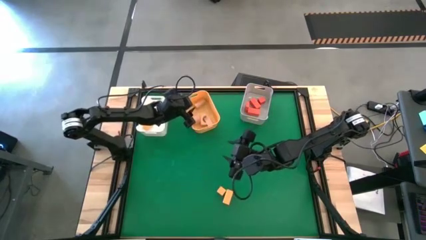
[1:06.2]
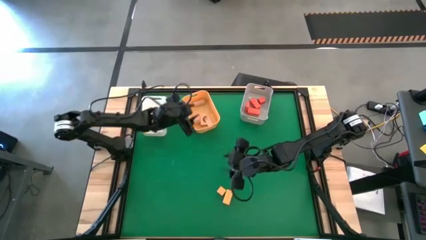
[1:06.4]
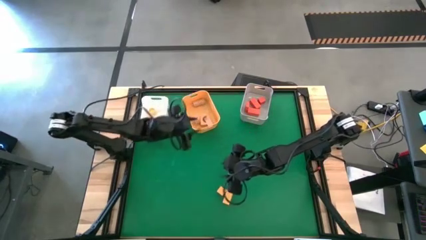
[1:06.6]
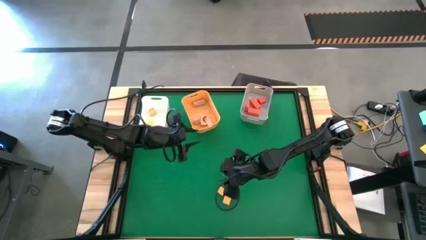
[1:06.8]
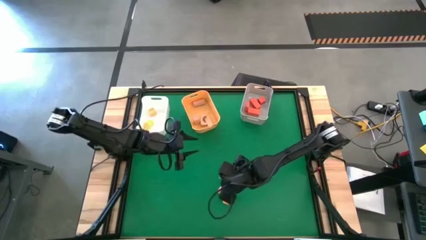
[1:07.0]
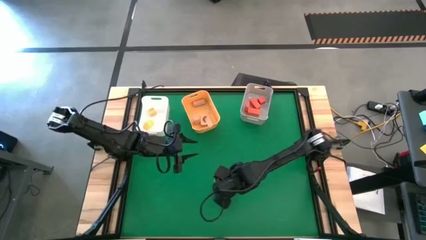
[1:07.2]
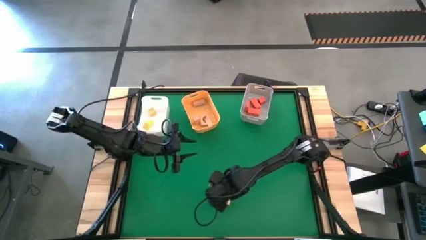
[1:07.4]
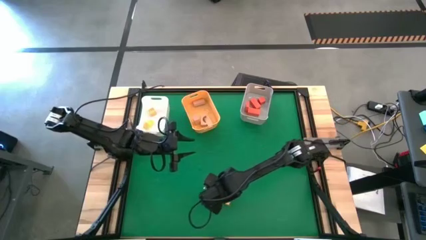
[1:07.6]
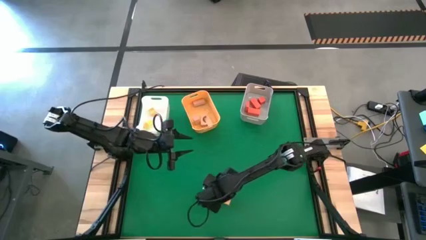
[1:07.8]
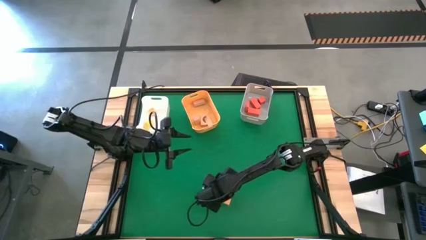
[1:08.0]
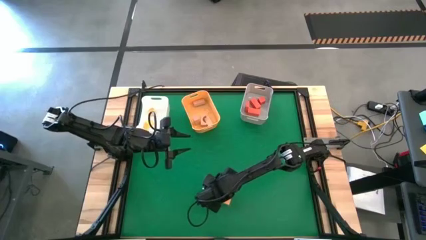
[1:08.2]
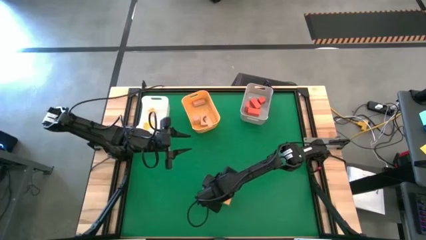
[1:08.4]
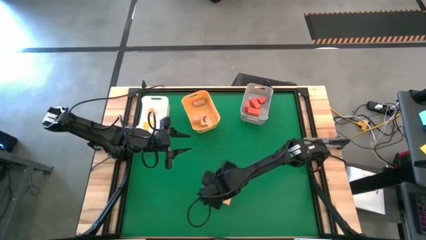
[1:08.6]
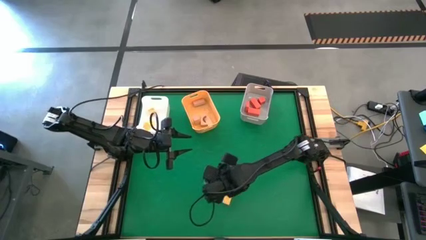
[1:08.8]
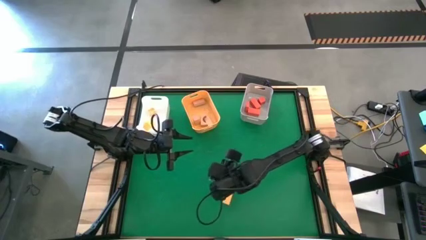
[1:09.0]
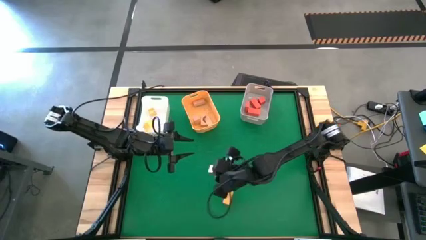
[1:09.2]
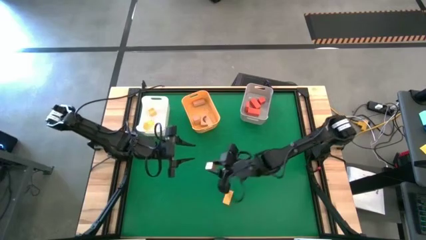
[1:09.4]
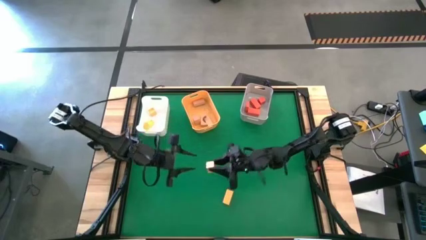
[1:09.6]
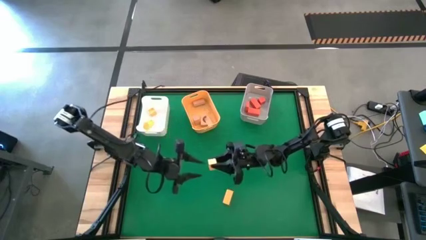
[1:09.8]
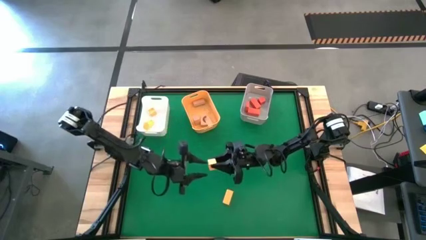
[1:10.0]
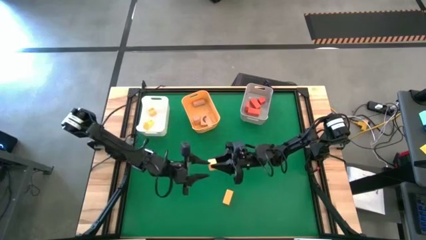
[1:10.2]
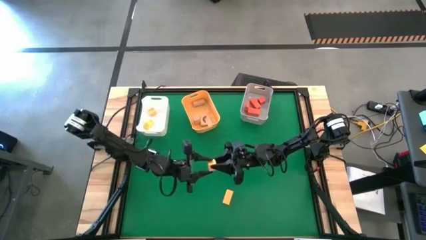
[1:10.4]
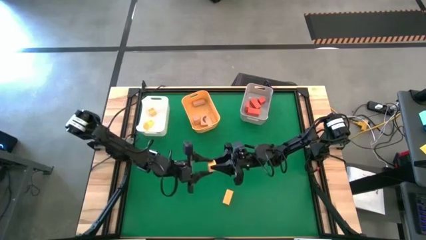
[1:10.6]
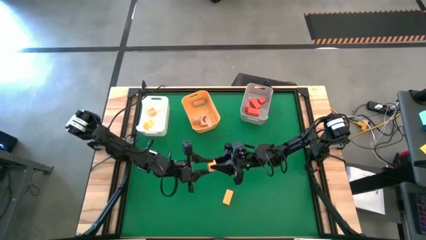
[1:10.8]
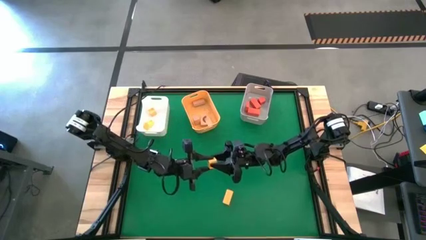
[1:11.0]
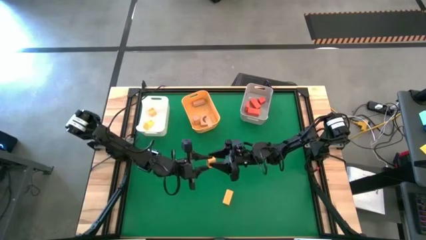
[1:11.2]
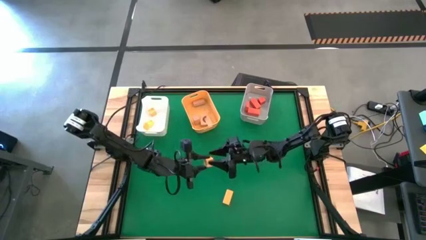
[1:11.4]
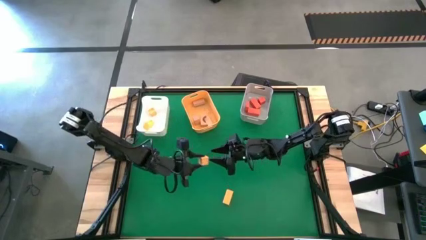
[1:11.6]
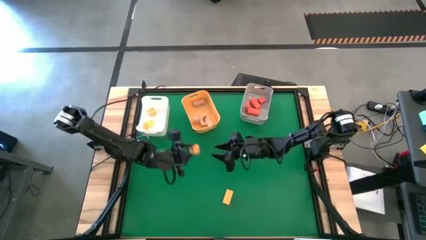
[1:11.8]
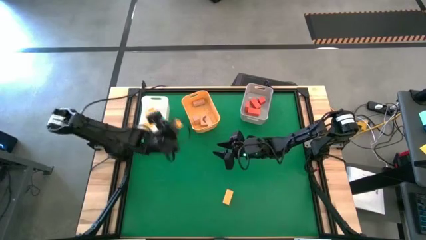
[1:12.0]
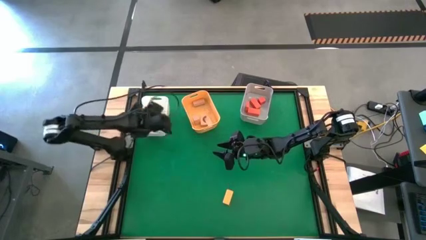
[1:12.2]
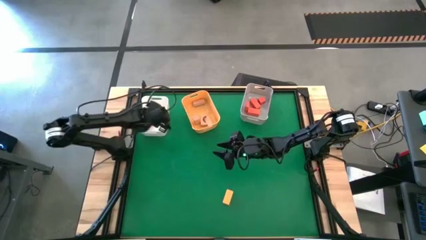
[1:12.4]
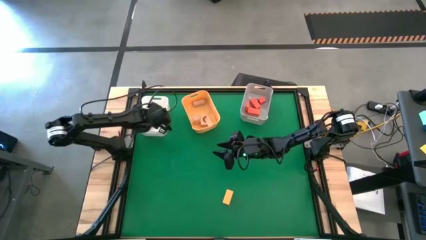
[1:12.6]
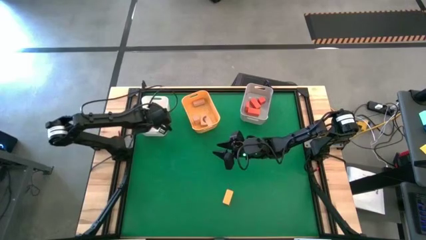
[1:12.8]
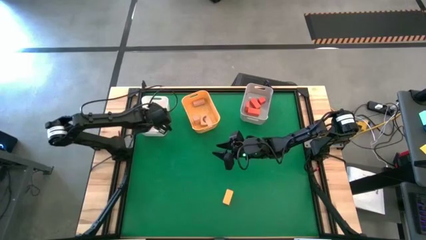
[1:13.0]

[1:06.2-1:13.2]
Task: Sort & place blocks by color
Put the yellow block into the white bin

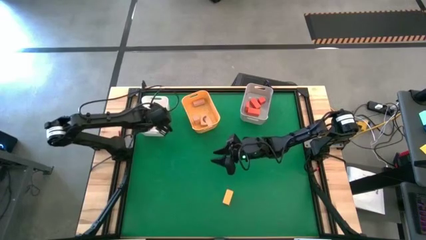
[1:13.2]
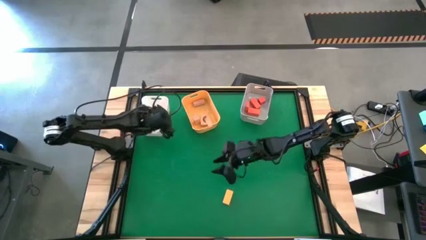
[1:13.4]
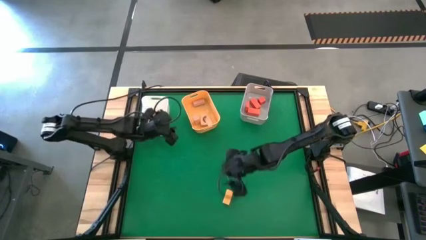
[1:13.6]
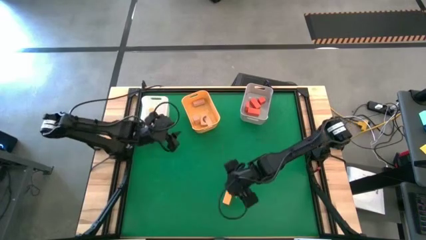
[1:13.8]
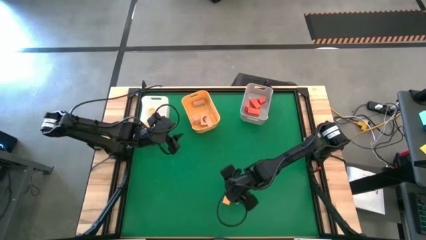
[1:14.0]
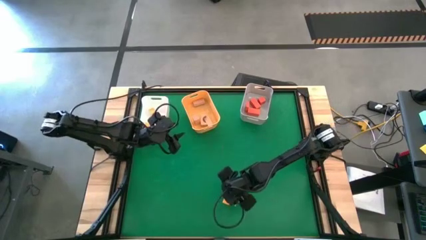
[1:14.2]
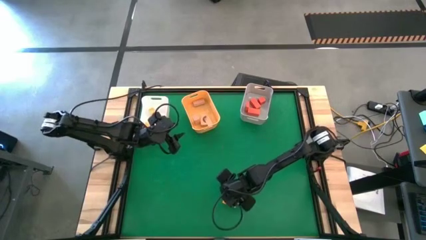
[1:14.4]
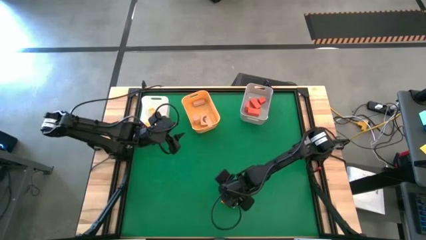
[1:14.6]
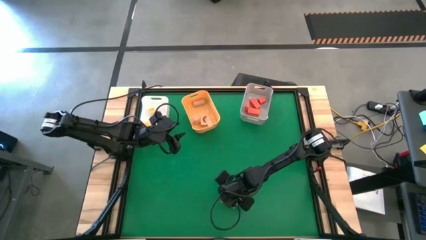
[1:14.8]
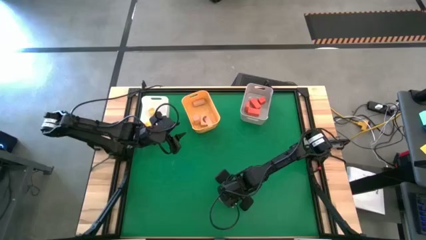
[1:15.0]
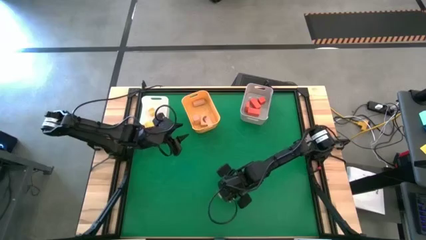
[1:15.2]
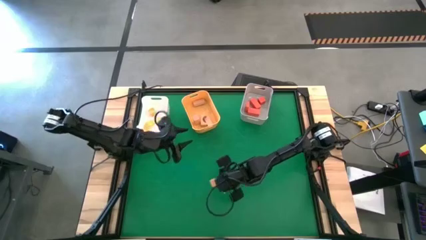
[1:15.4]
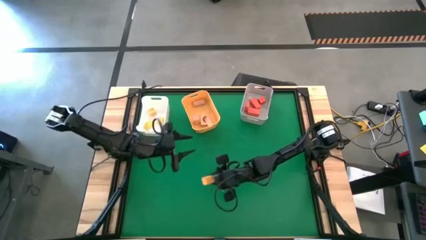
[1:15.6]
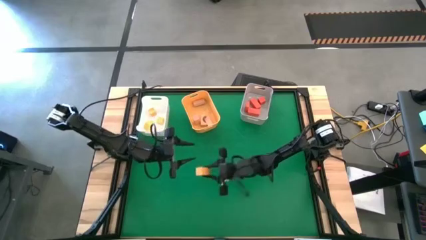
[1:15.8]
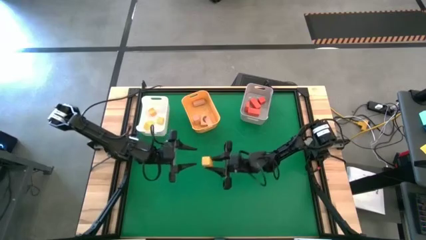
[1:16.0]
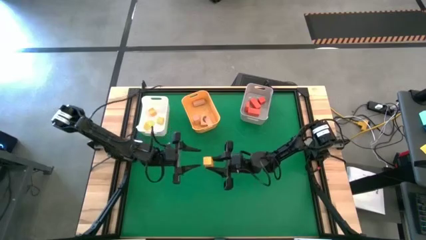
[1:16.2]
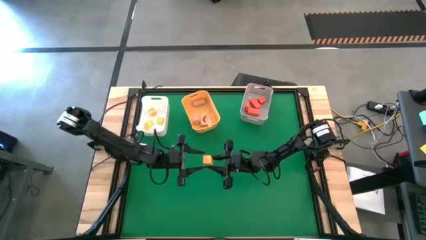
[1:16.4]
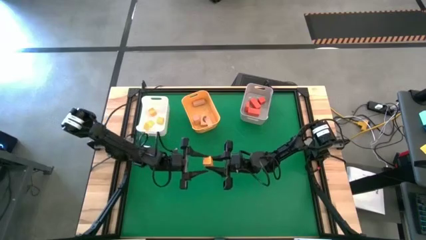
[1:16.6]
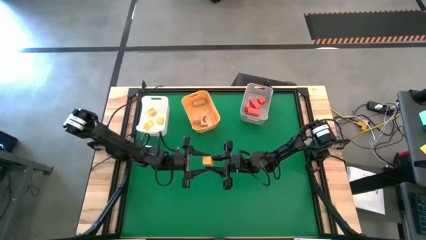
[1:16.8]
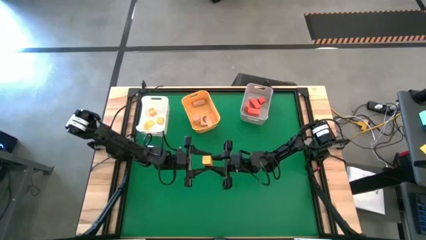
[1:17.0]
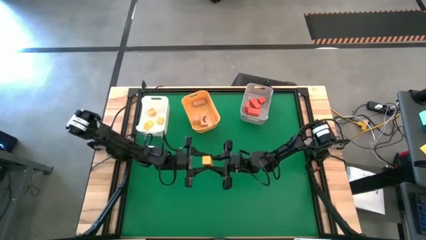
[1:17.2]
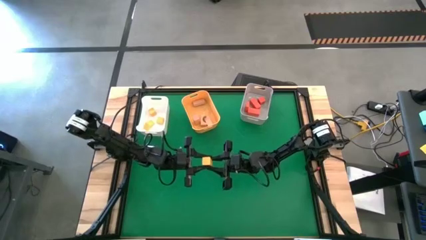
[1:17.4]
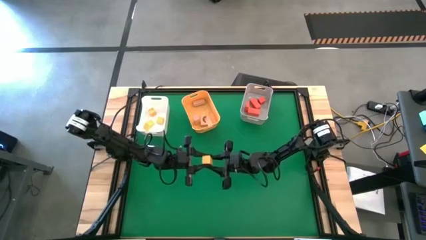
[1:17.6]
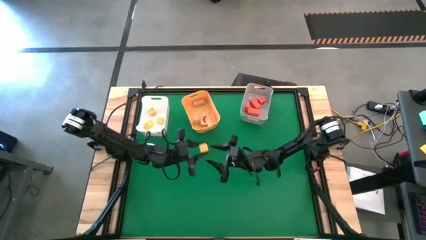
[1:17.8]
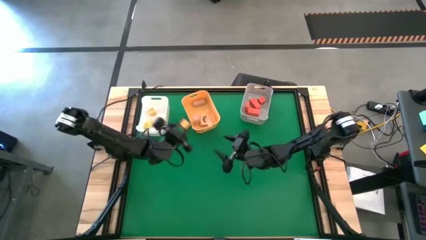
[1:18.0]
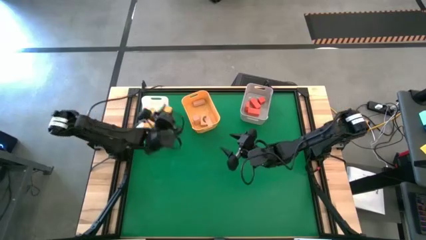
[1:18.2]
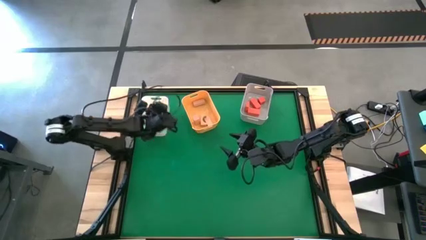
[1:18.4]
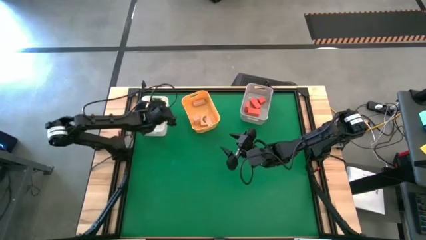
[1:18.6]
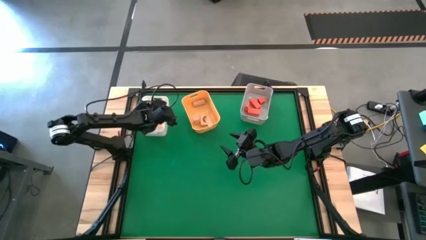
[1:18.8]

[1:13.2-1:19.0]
Put the yellow block into the white bin

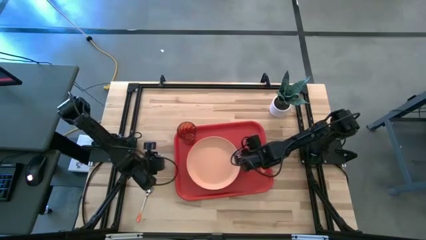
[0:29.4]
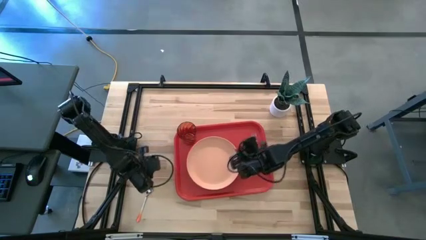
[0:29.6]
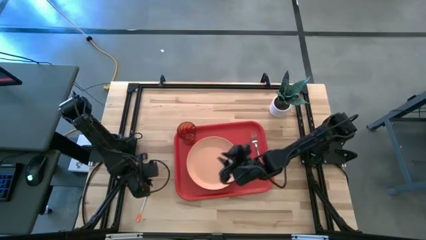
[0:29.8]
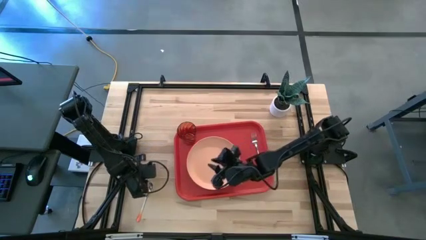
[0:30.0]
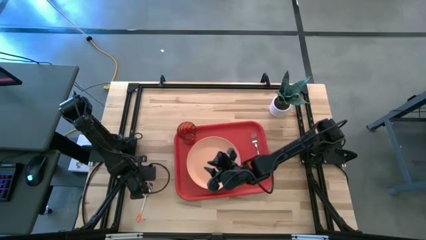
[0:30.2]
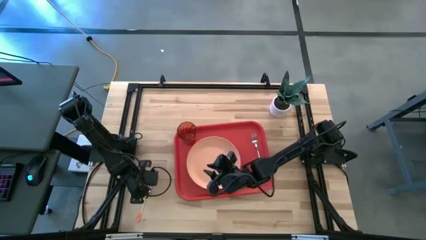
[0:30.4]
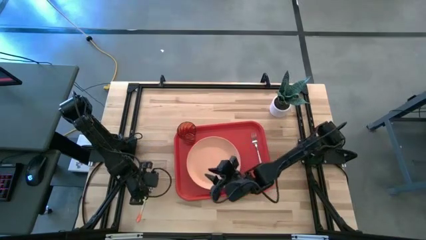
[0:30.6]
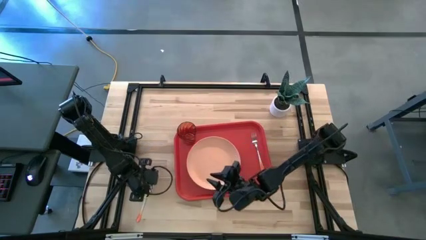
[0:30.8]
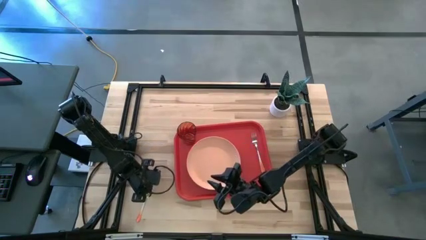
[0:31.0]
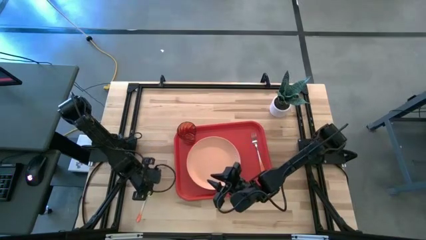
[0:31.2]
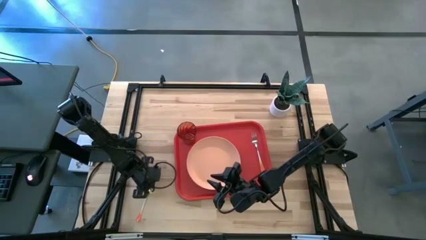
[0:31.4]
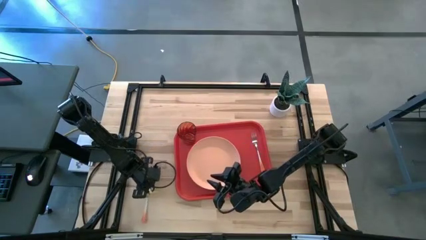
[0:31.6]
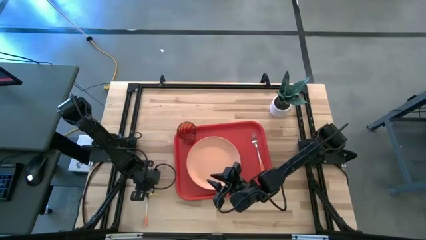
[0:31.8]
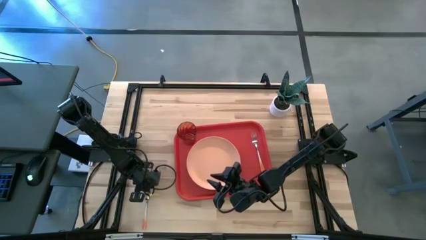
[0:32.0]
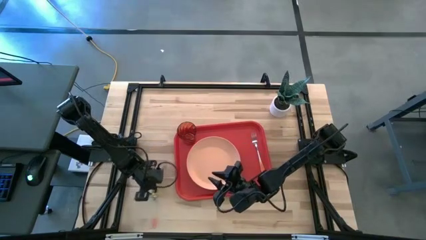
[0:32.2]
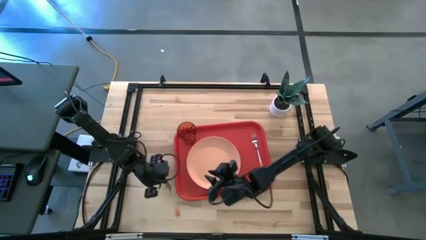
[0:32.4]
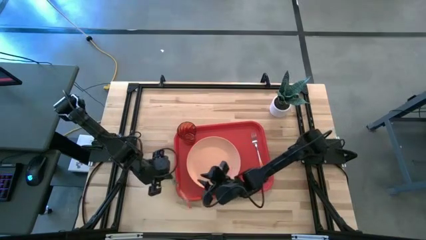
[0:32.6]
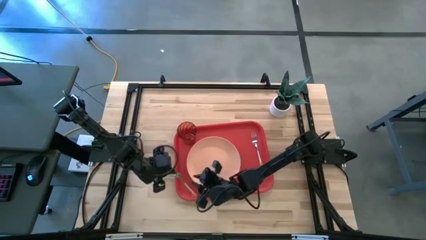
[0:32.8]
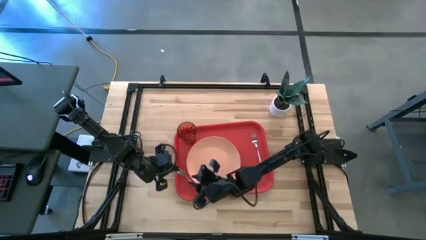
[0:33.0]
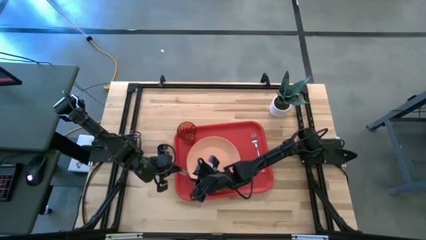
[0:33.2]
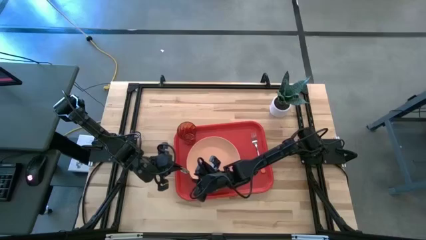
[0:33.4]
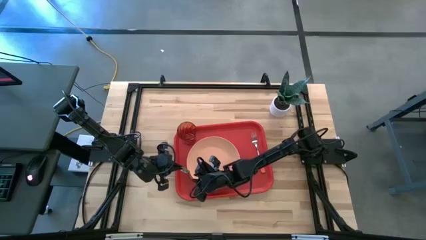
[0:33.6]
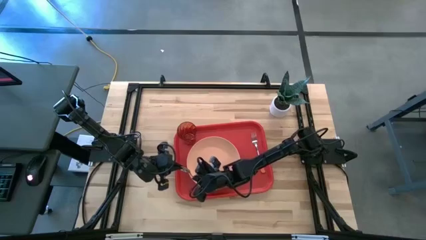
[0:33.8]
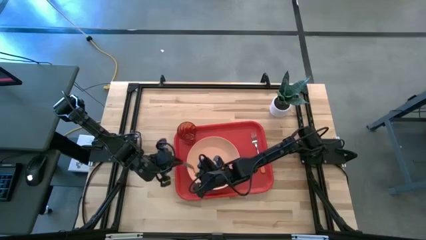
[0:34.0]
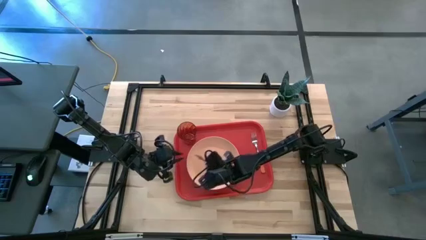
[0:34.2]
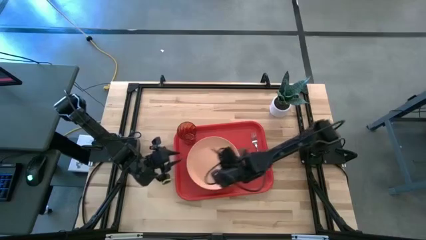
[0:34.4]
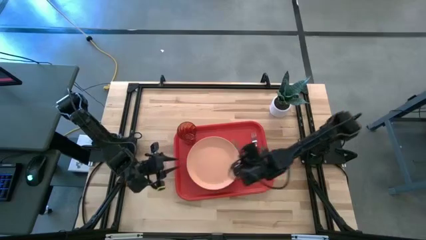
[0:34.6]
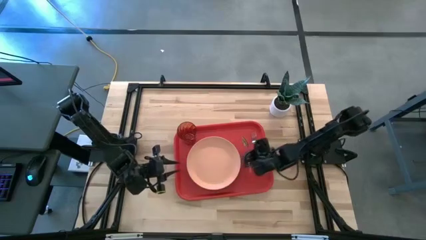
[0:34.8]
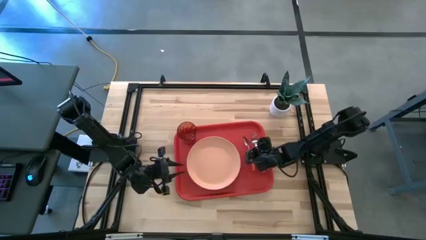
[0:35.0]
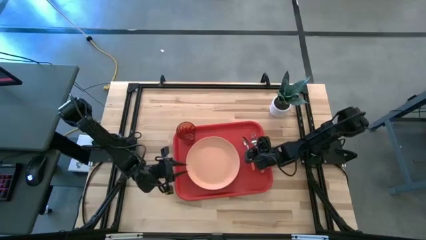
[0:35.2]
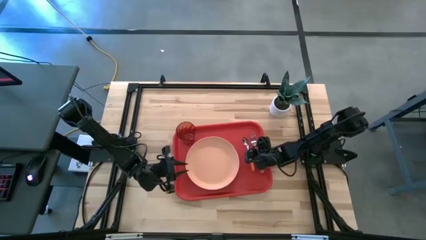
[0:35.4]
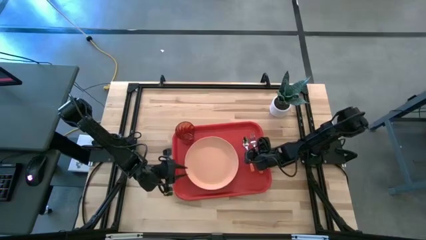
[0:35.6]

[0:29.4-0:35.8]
Task: Pick and place plate/cup/fork/spoon on tray
Put the orange spoon on the red serving tray to the left of the orange fork
